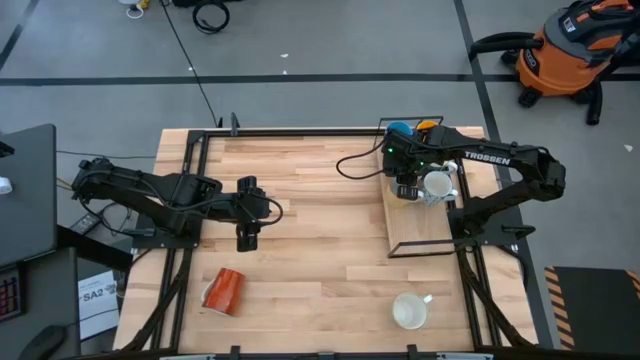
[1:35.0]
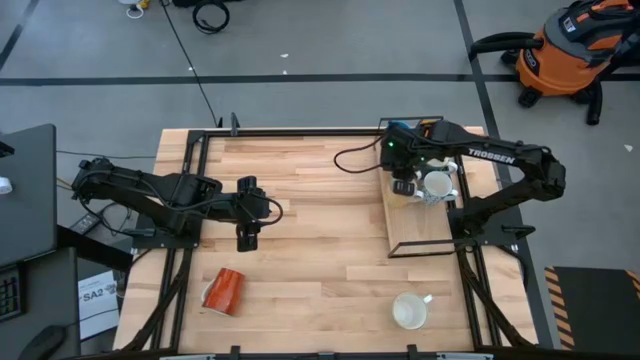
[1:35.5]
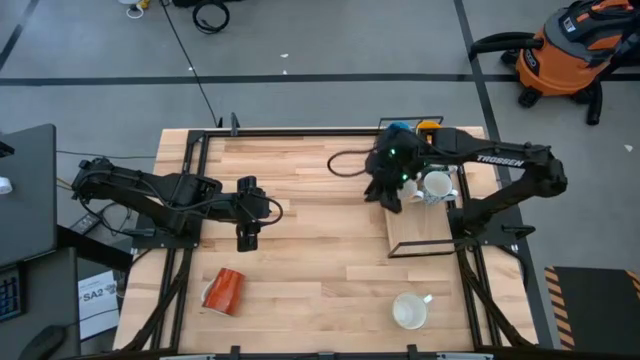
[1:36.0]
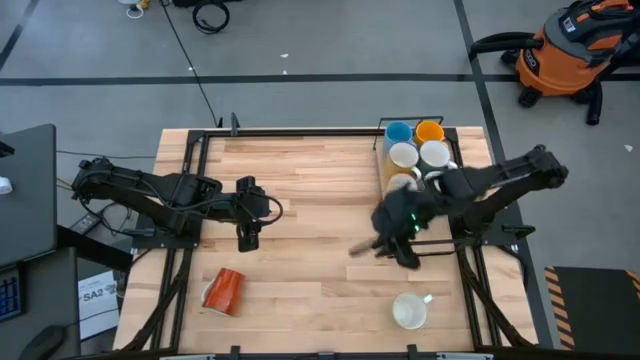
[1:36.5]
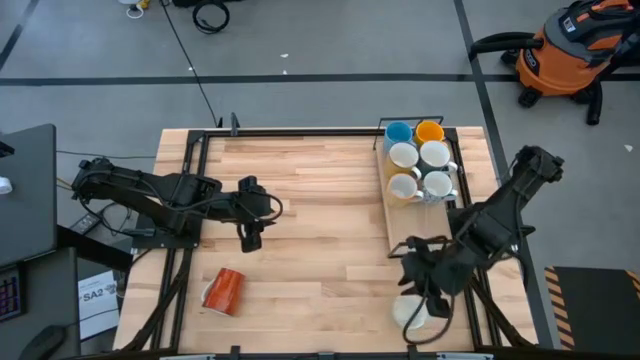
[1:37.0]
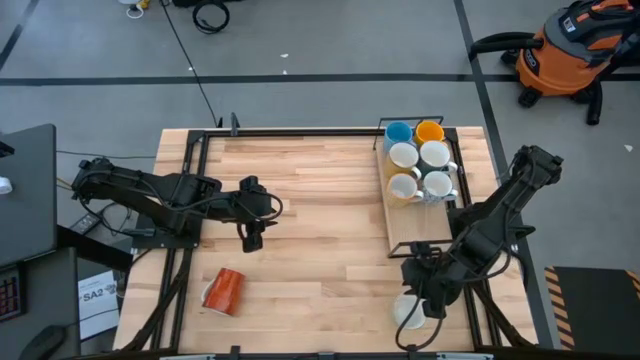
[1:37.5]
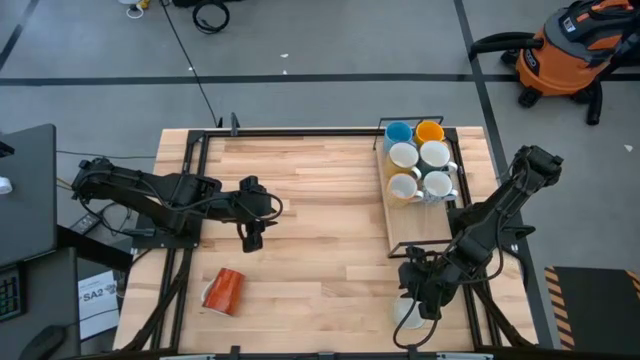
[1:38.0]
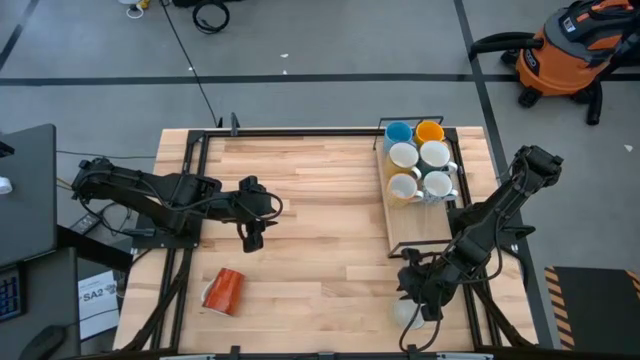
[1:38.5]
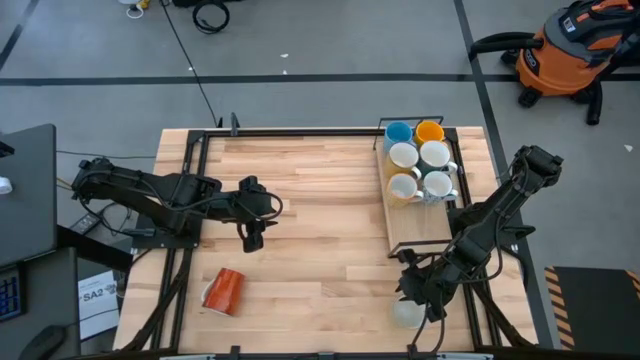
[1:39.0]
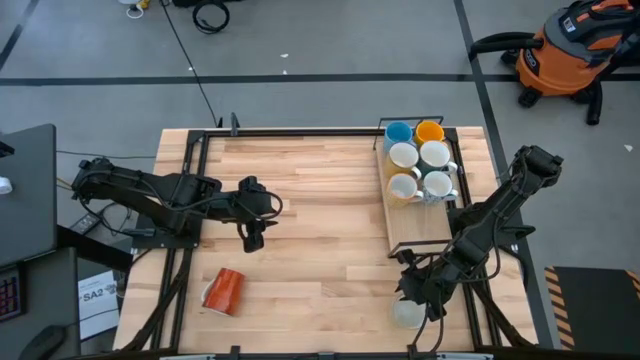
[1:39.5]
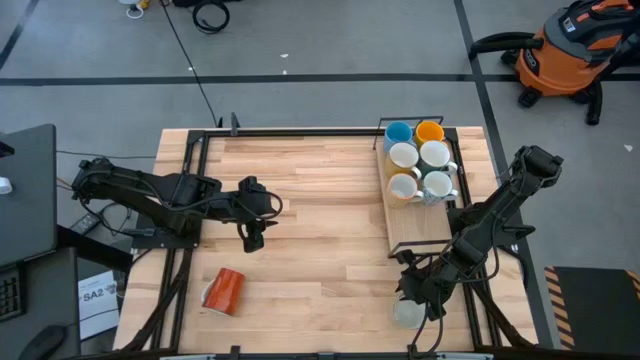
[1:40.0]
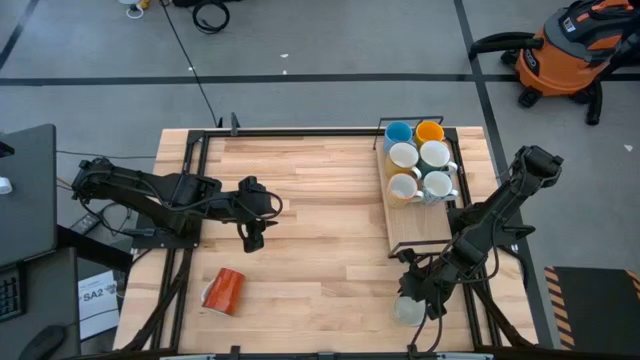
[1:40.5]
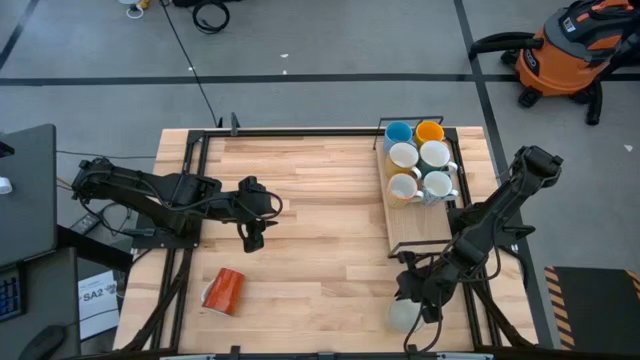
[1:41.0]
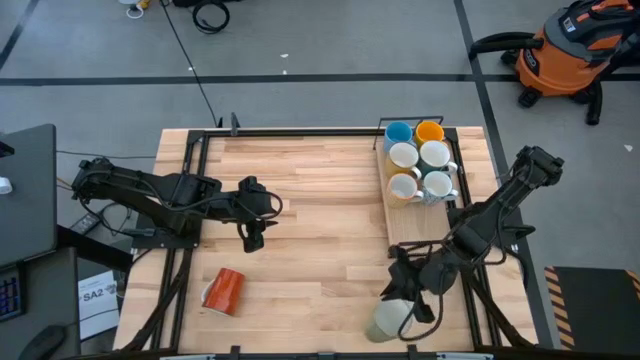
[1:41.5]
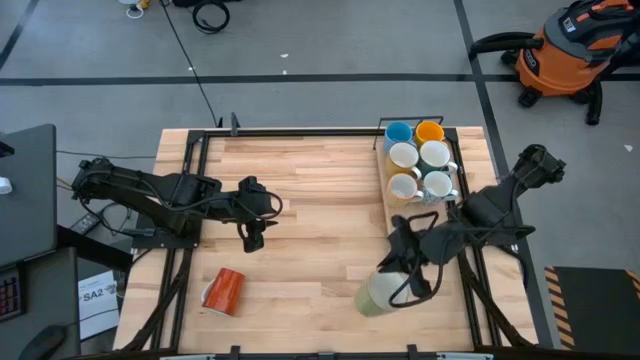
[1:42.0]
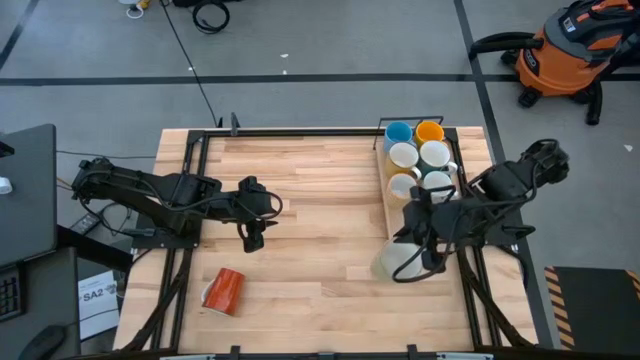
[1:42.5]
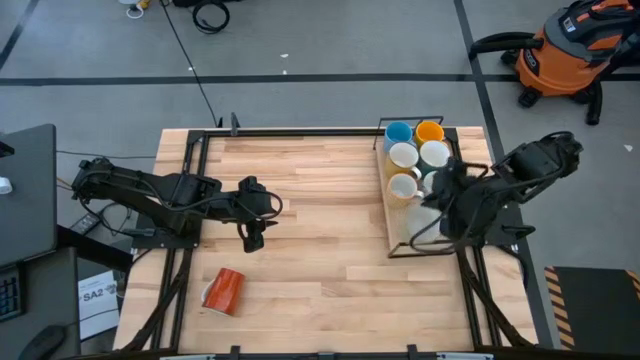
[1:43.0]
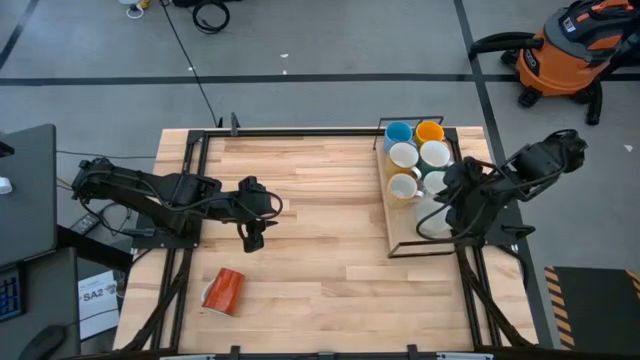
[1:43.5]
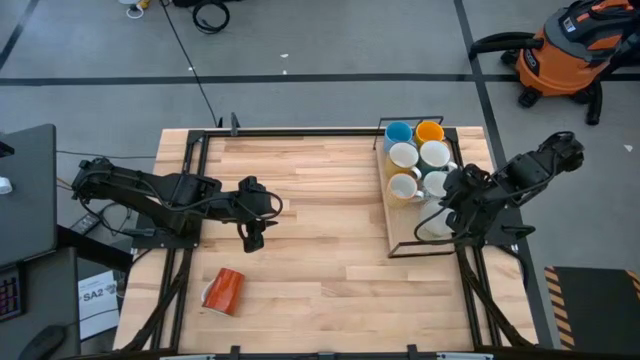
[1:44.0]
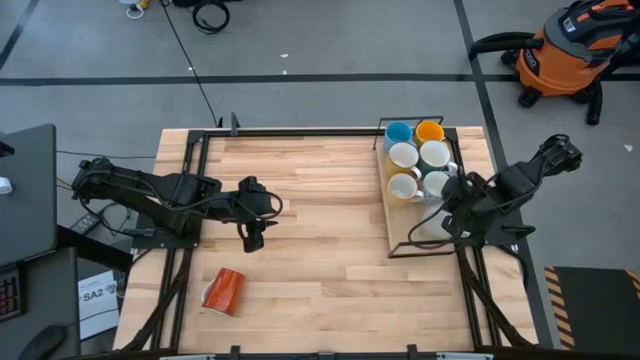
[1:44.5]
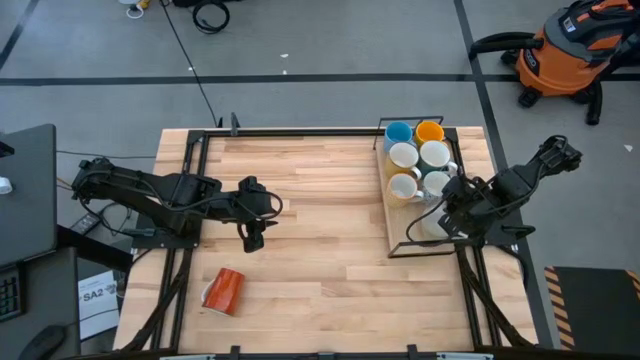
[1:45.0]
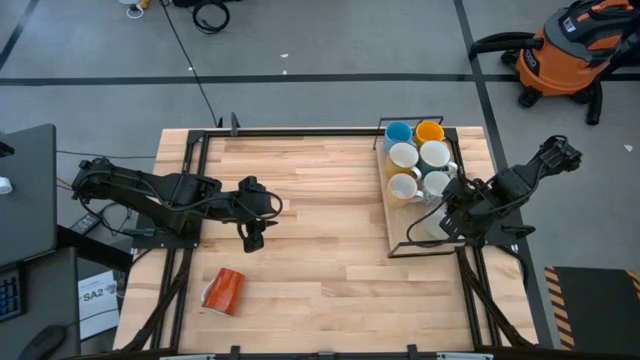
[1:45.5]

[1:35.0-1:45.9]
Task: Place coffee mugs
Put the light green mug on the shelf

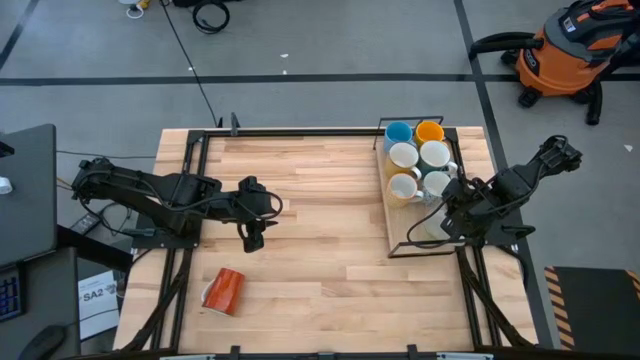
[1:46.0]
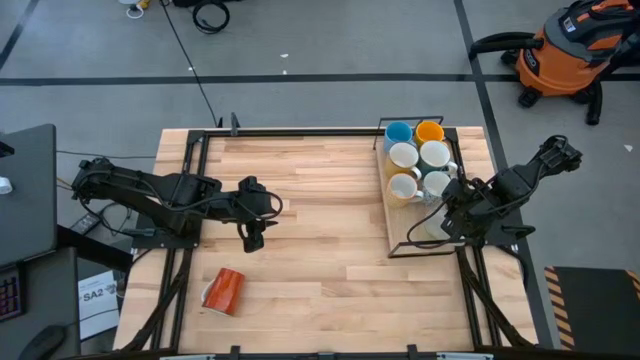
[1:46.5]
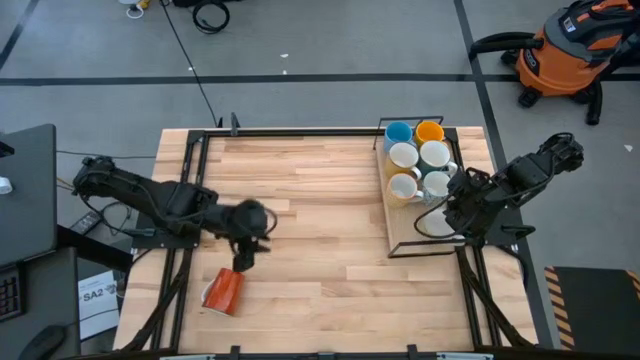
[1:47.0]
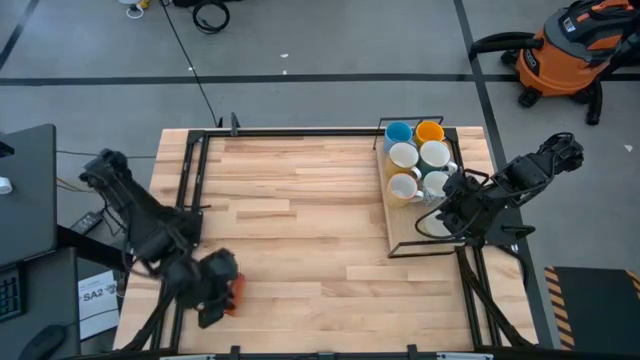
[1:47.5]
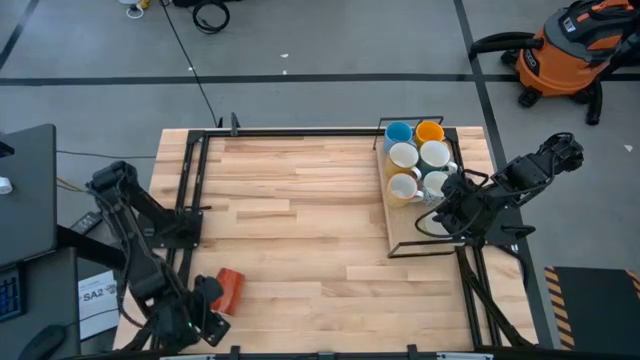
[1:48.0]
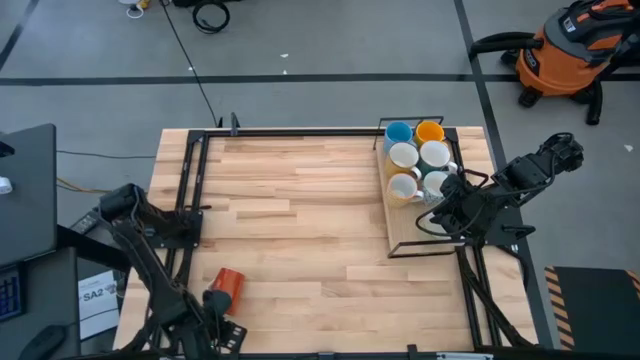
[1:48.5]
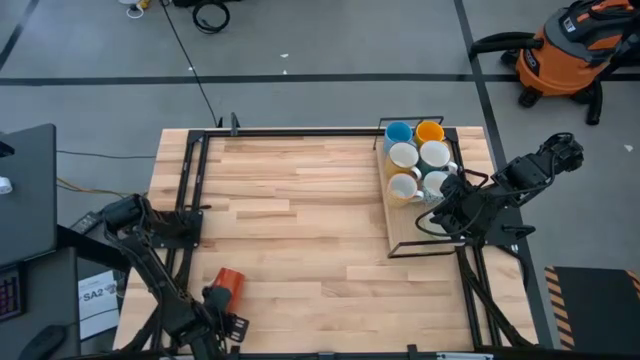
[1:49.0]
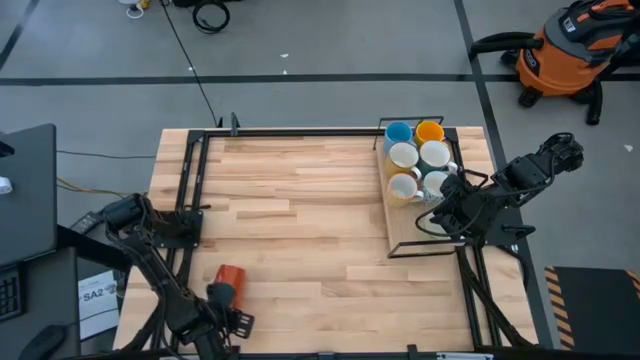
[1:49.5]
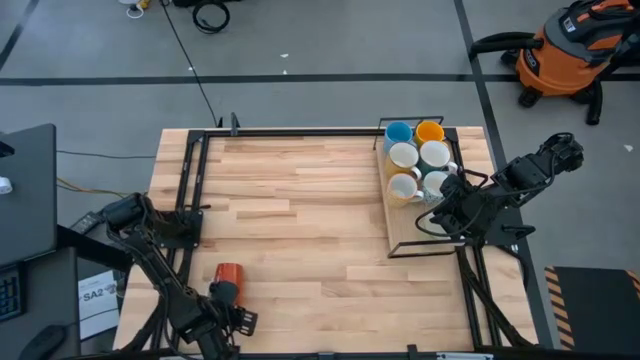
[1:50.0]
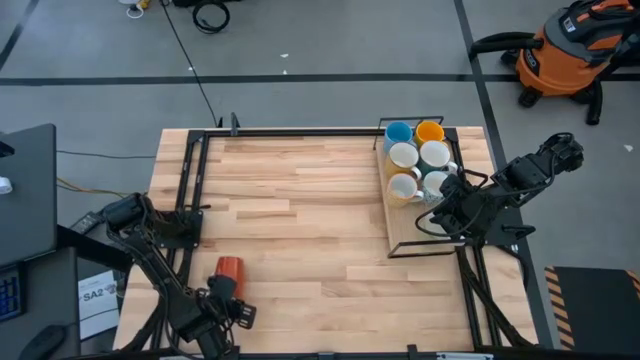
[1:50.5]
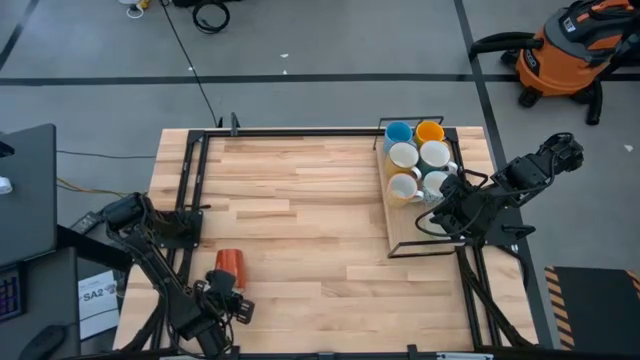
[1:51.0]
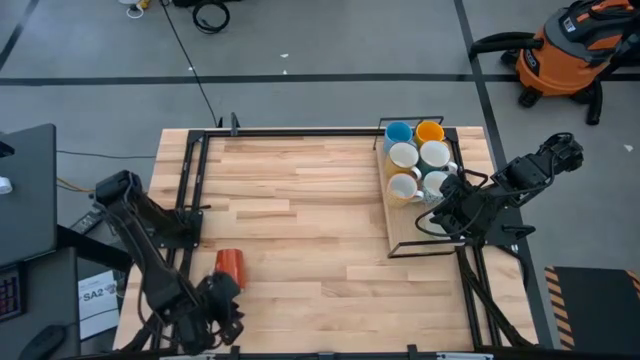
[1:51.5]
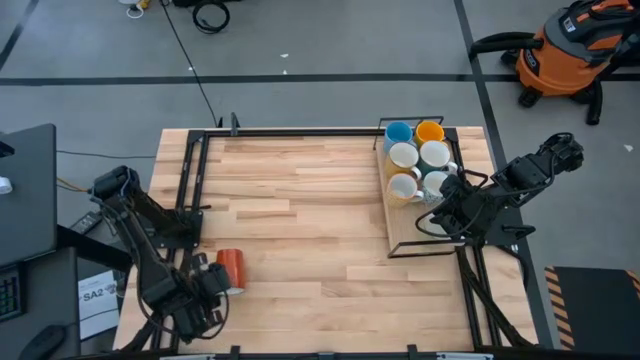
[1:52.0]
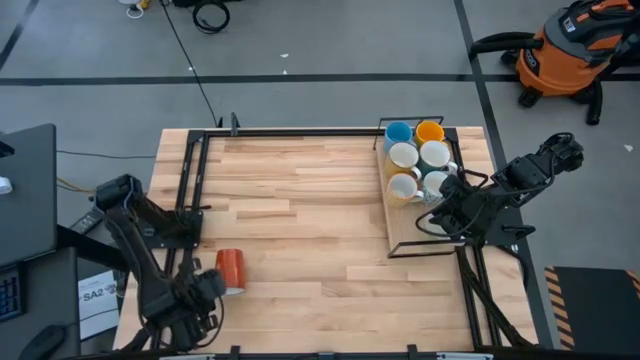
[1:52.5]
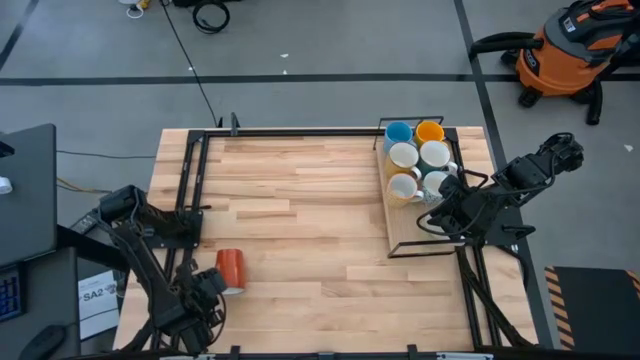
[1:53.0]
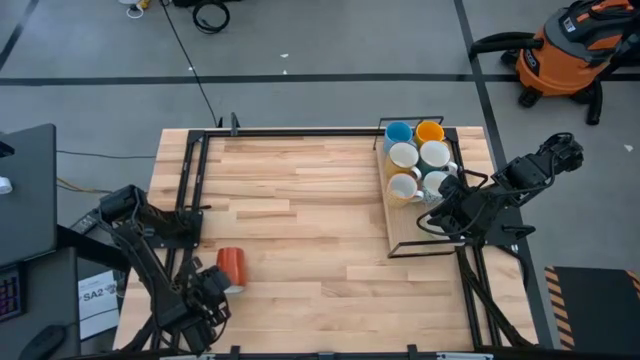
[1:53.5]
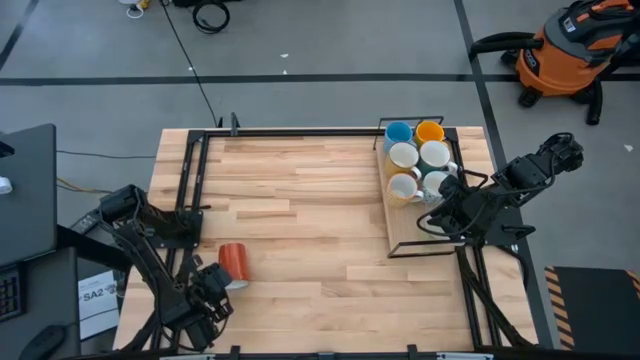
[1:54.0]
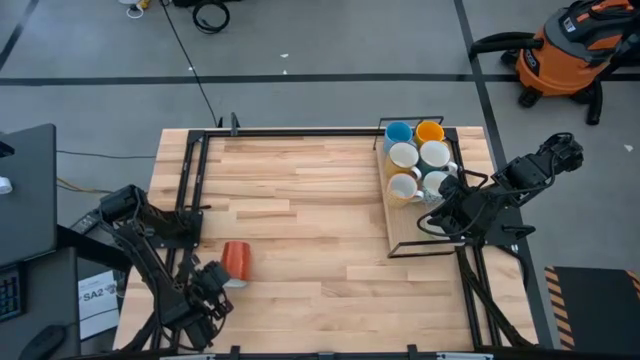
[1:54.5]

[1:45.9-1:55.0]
Put the brown mug on the shelf
